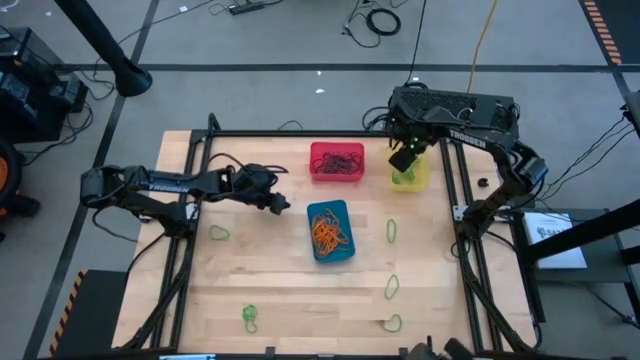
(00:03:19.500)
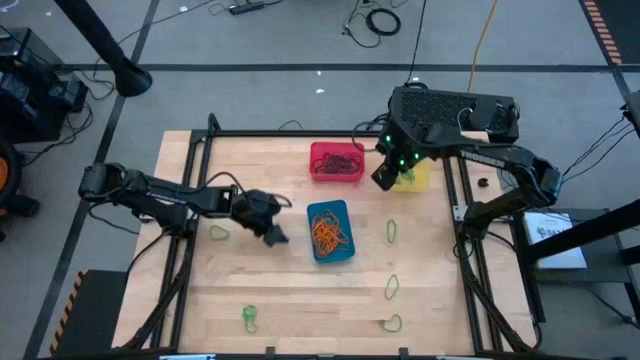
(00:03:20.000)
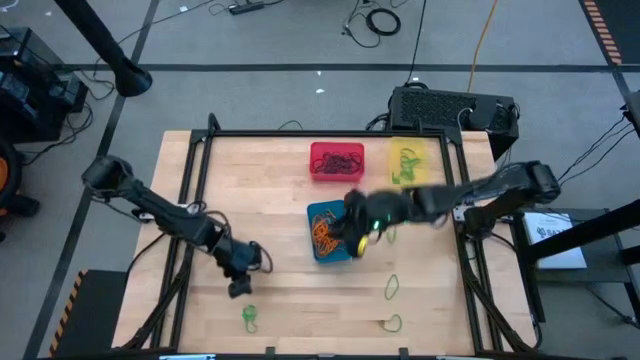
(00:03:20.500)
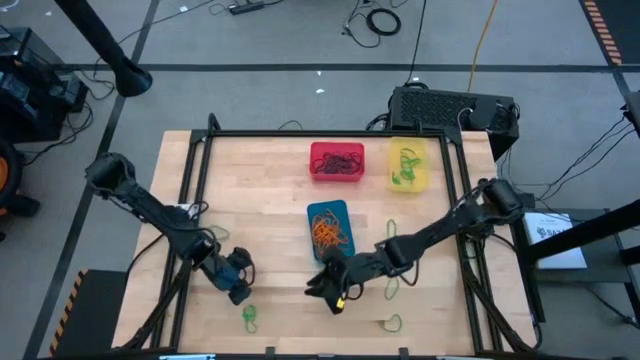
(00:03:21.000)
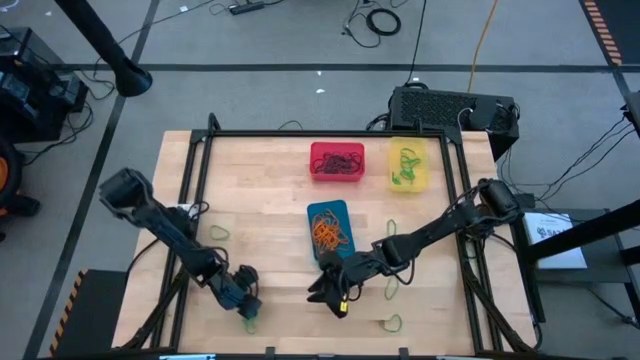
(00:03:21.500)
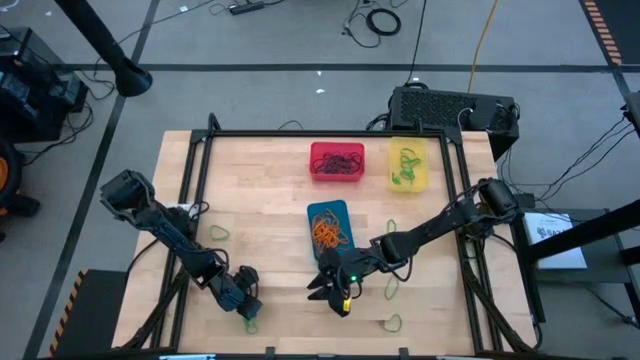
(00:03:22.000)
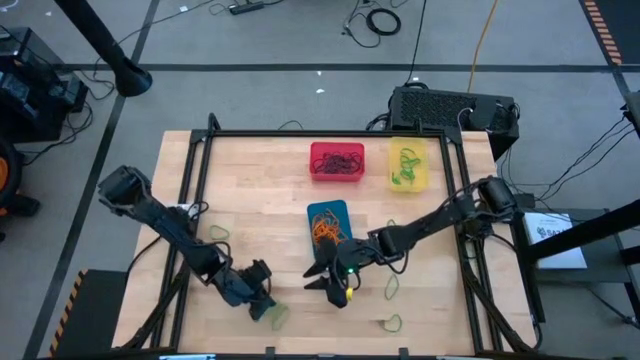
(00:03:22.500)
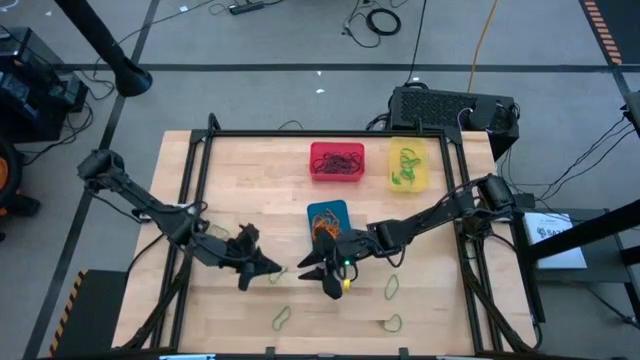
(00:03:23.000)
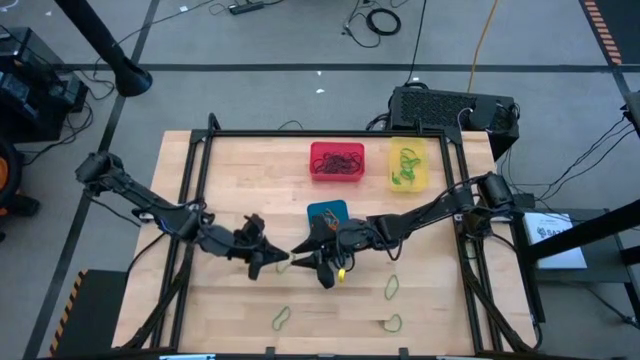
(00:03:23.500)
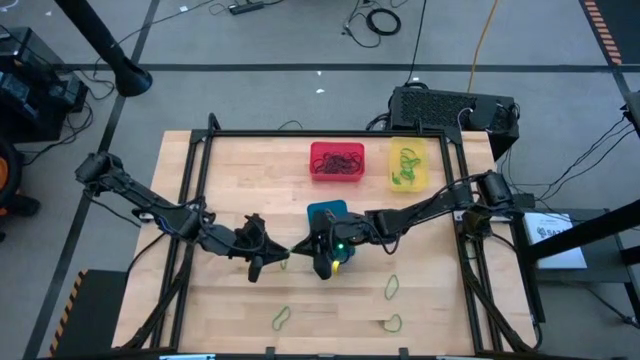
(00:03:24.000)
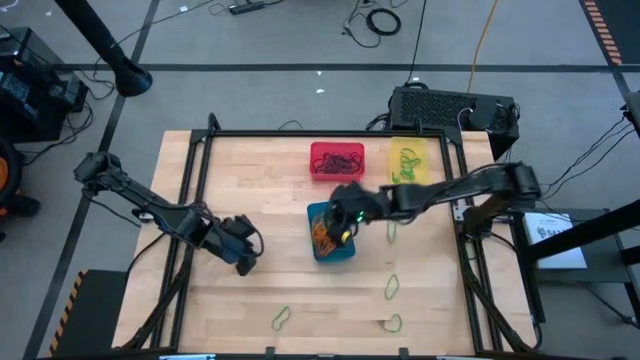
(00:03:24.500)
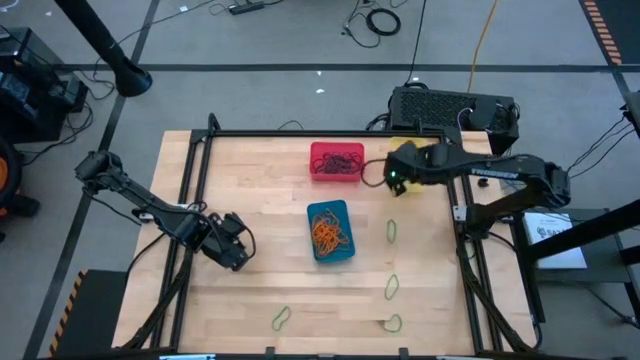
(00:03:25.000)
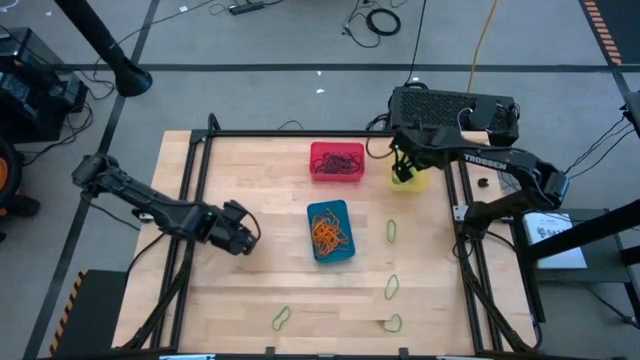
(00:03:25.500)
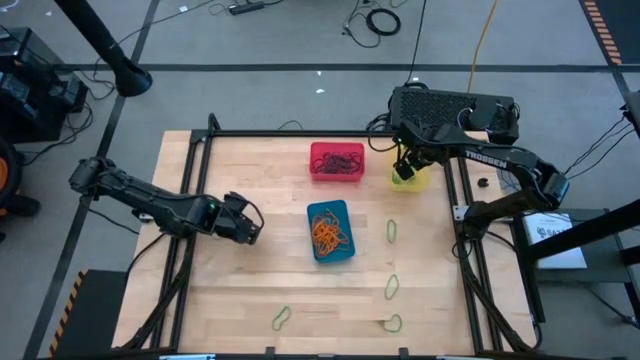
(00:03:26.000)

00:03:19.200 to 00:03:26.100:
Task: Sort rubber bands into baskets
Put the green rubber band into the yellow bin

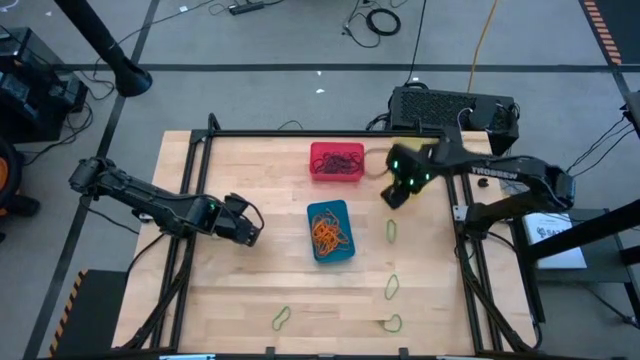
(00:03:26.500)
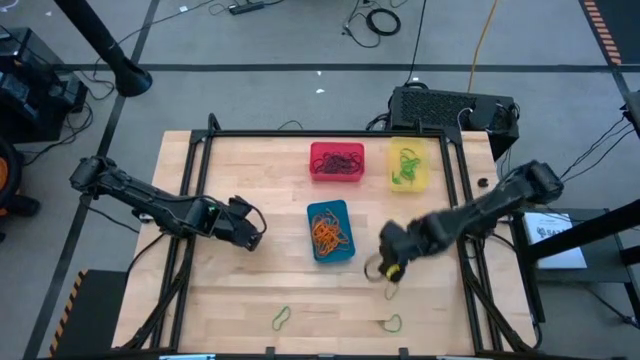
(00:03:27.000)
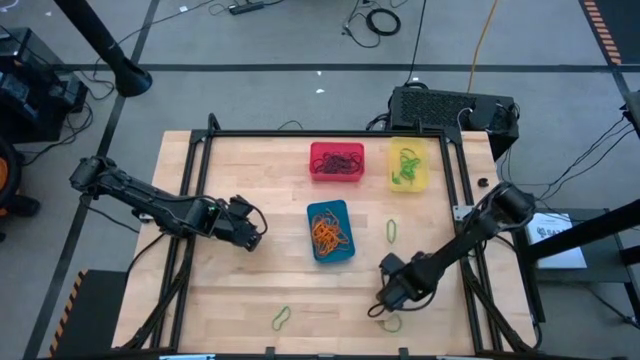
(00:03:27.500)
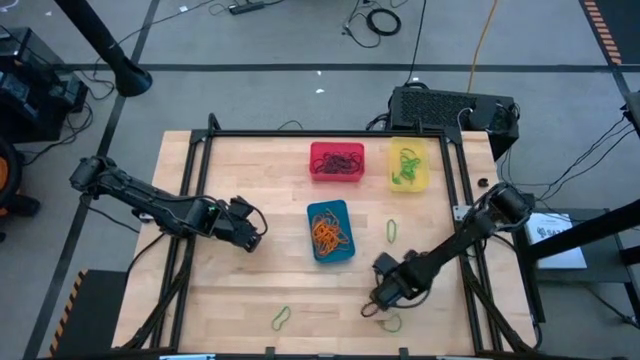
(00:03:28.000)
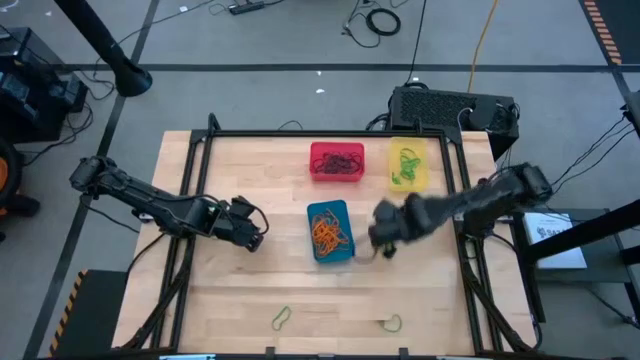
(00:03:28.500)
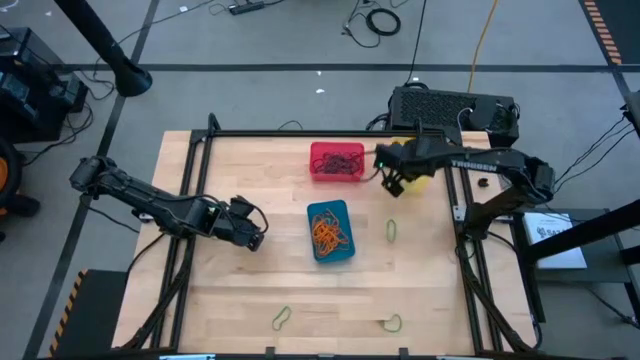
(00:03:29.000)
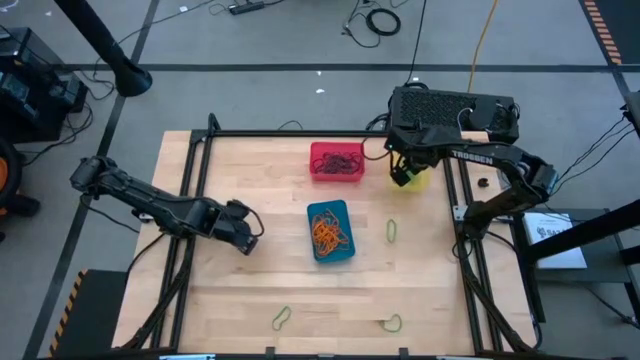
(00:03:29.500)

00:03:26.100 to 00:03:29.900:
Put the green rubber band into the yellow bin

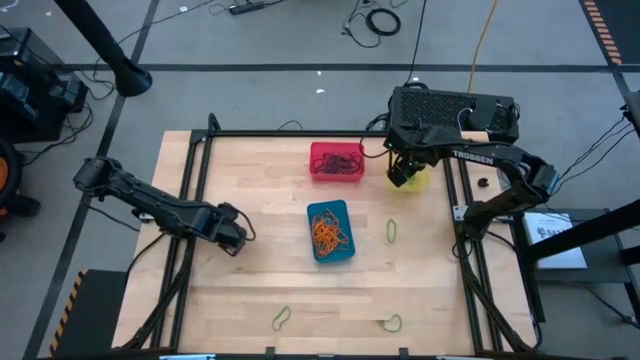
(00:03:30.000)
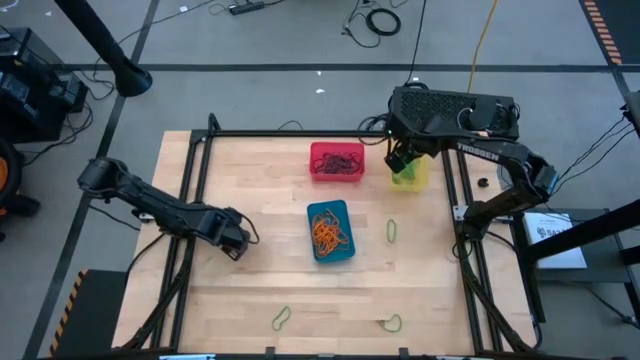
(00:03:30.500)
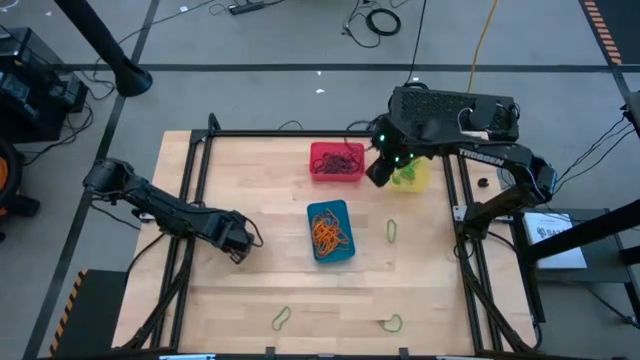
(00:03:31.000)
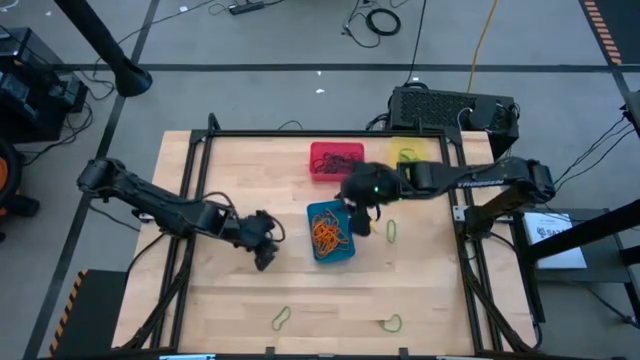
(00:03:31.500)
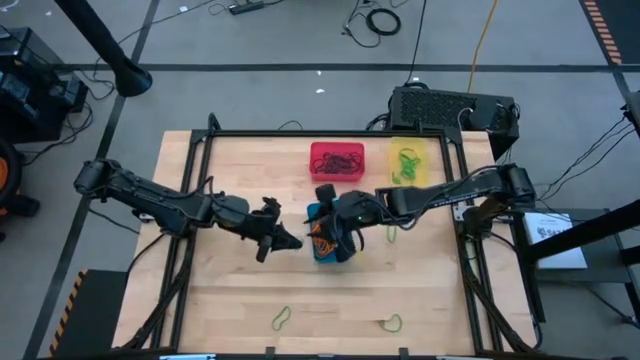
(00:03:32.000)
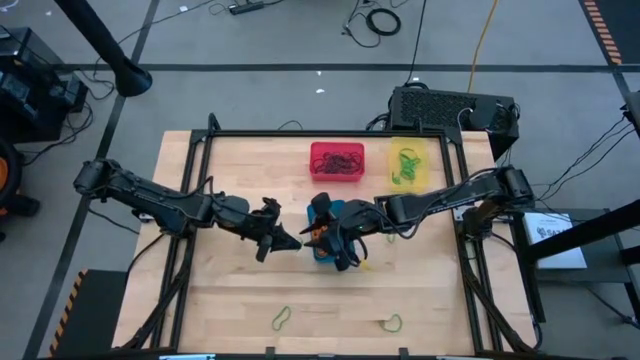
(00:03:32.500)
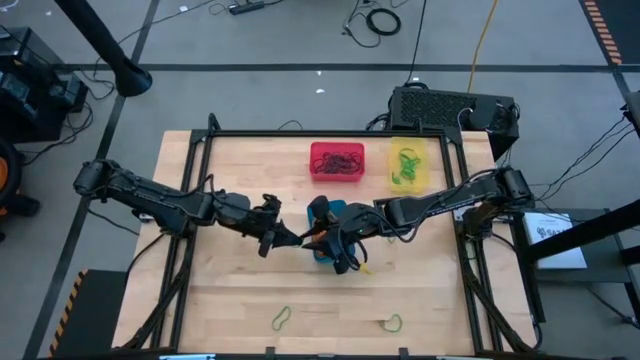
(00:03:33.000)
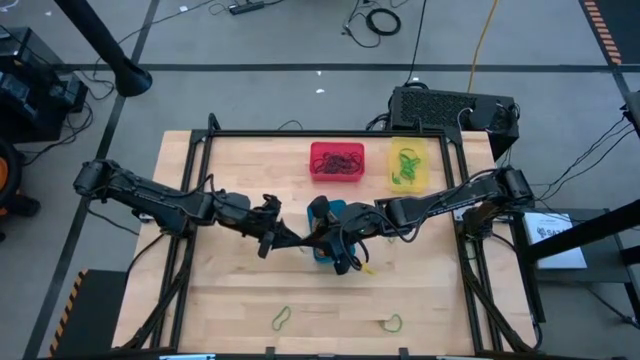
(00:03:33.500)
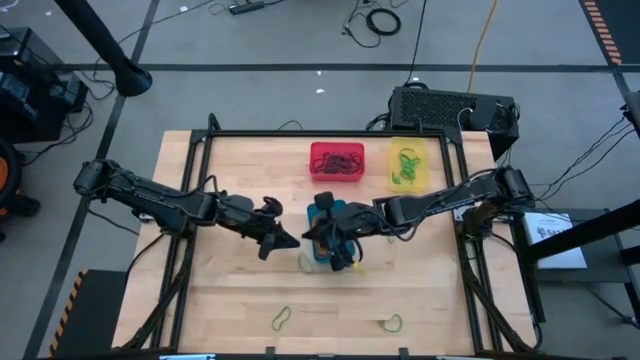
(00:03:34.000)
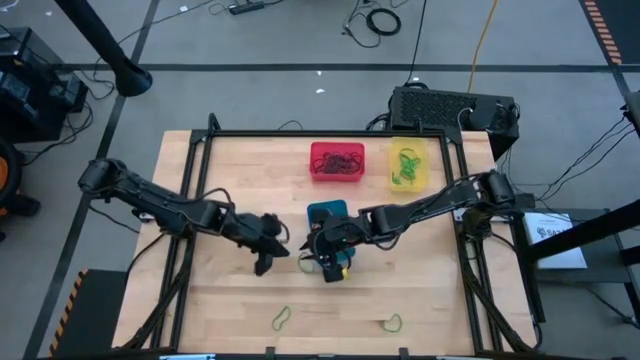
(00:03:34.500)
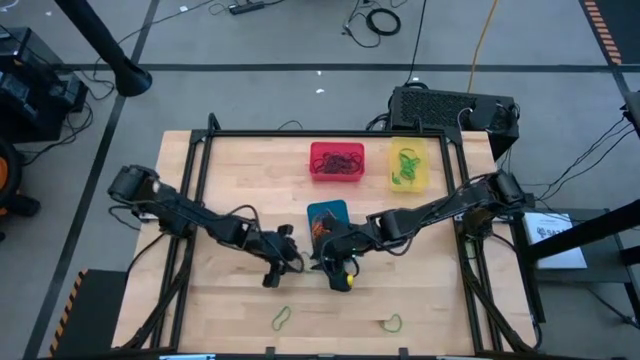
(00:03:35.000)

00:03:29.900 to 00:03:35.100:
Put the green rubber band into the yellow bin

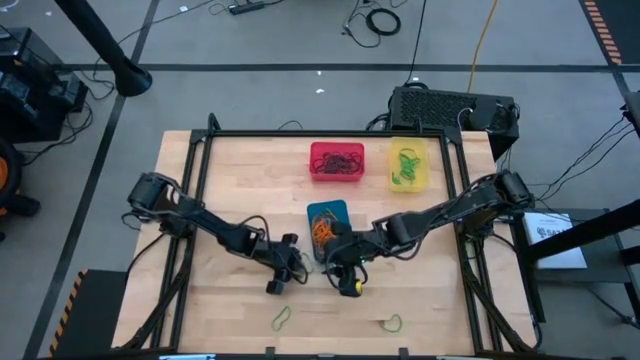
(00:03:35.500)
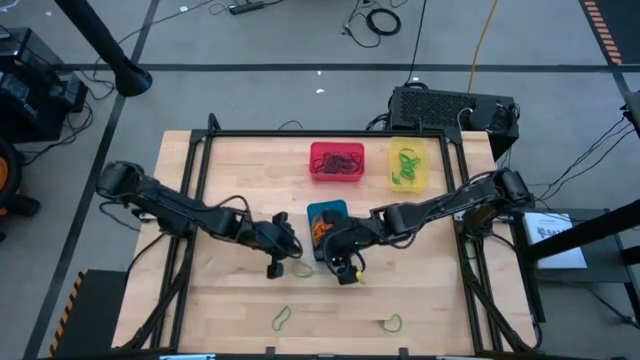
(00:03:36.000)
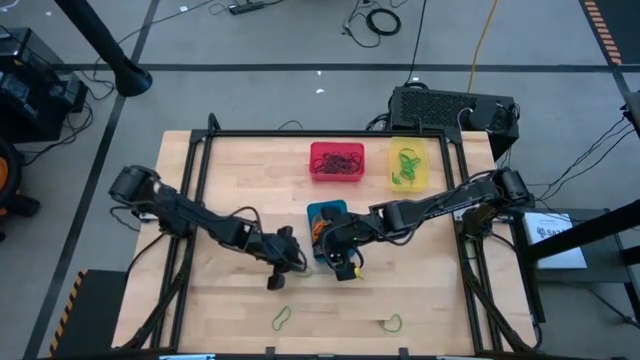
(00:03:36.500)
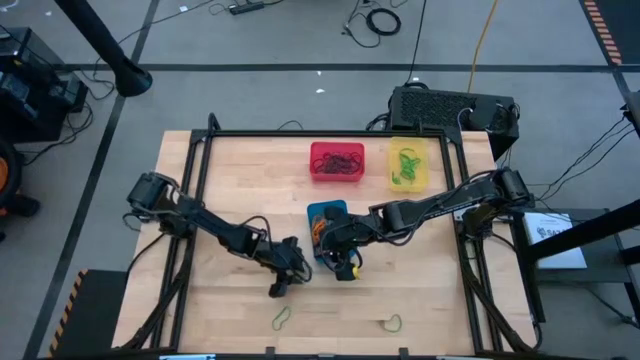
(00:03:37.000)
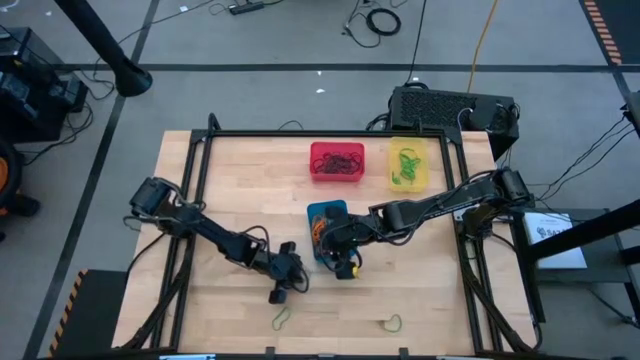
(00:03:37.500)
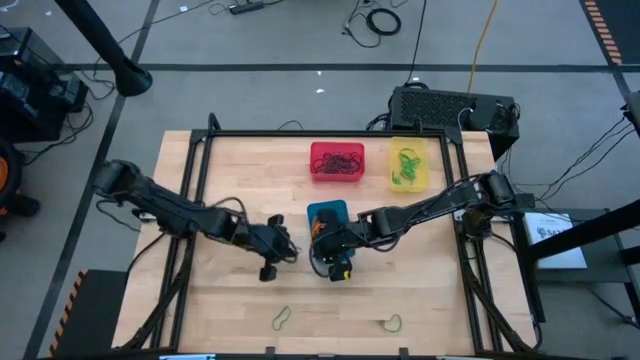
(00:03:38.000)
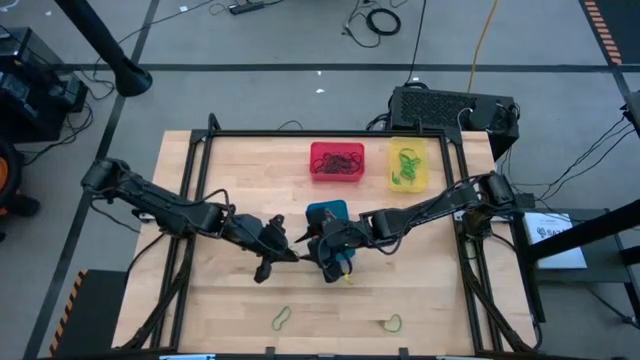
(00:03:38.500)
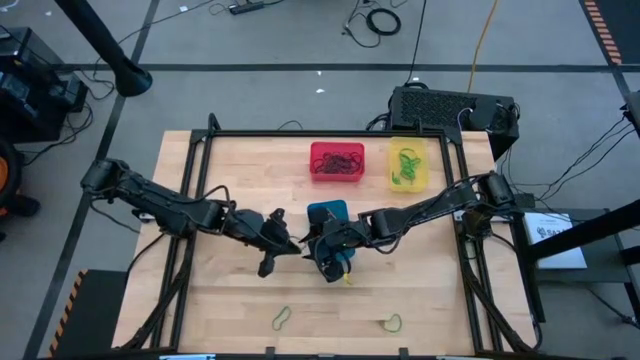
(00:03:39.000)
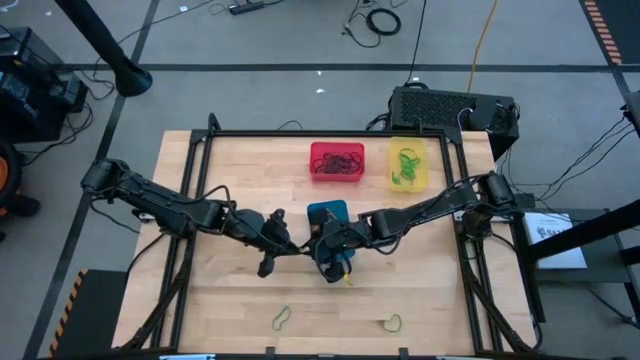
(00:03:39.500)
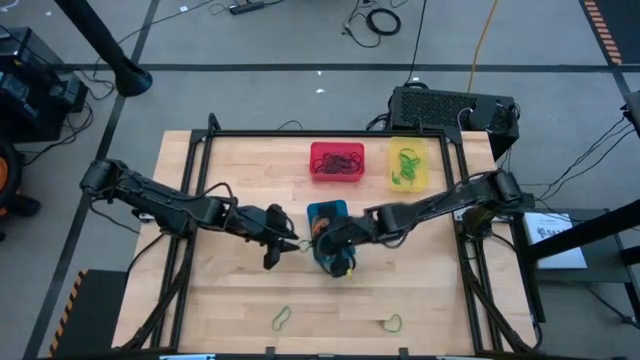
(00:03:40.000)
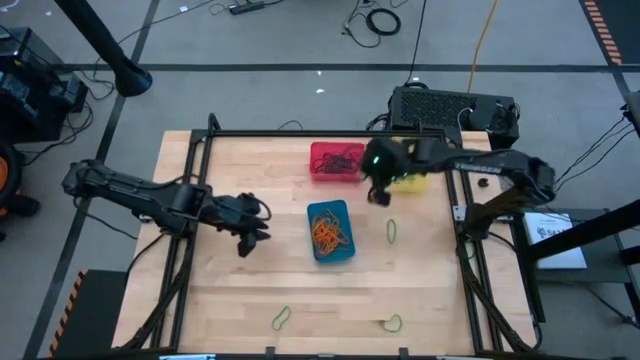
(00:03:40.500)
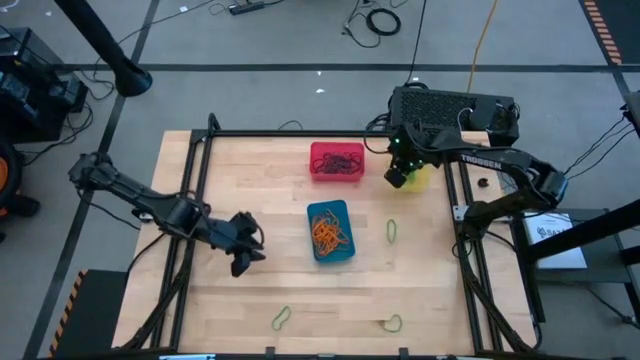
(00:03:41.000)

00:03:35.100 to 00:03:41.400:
Put the green rubber band into the yellow bin
